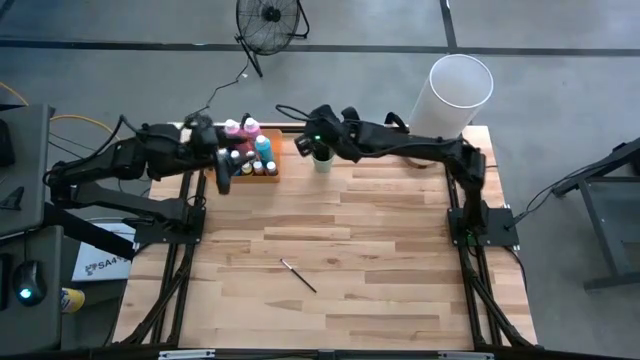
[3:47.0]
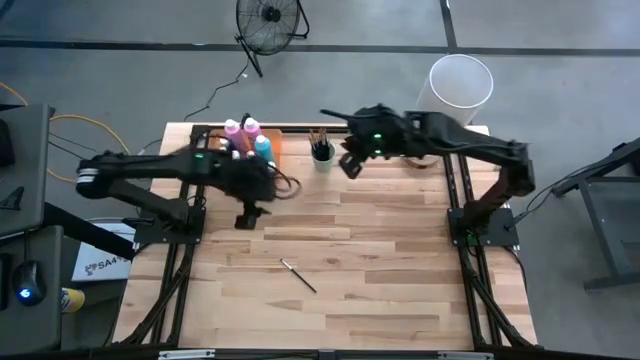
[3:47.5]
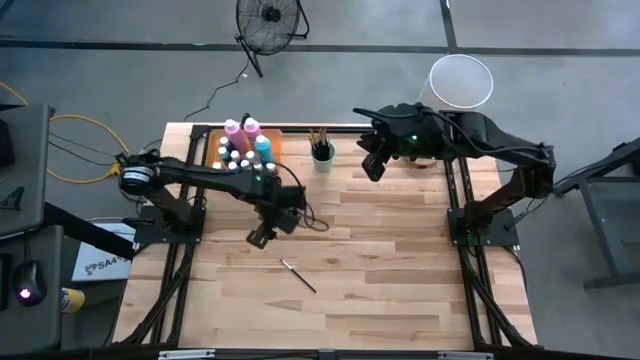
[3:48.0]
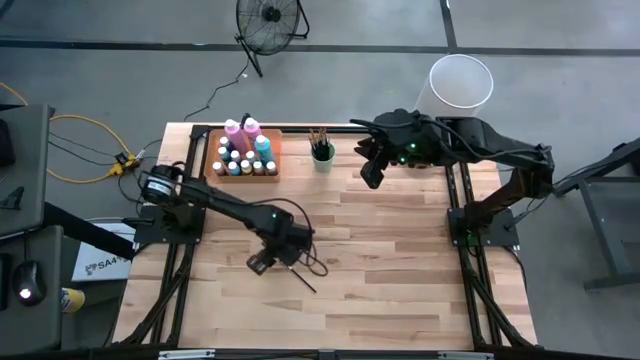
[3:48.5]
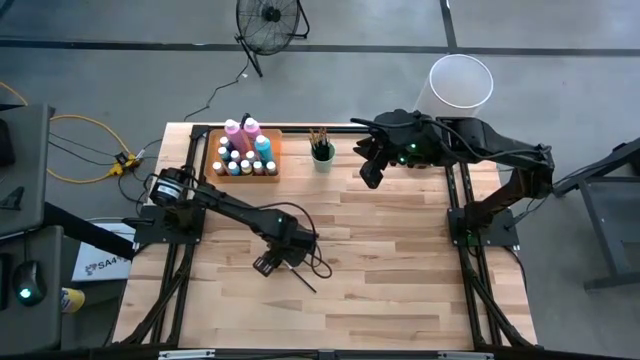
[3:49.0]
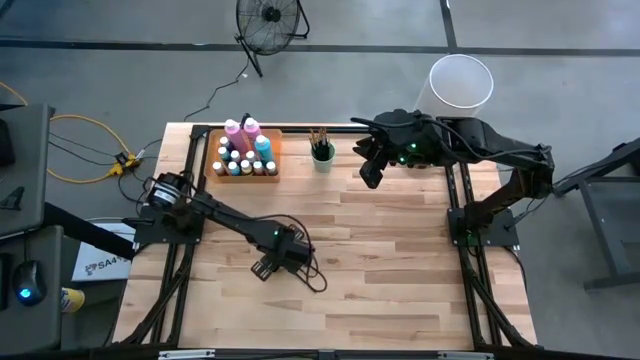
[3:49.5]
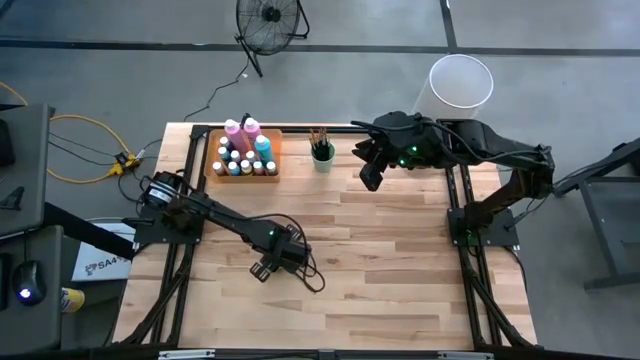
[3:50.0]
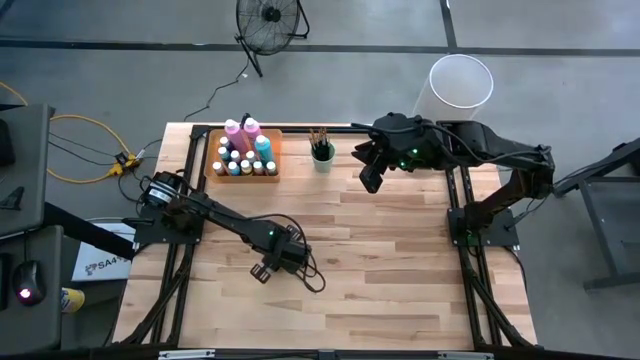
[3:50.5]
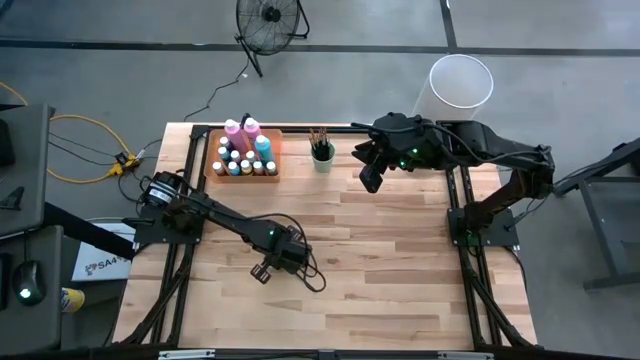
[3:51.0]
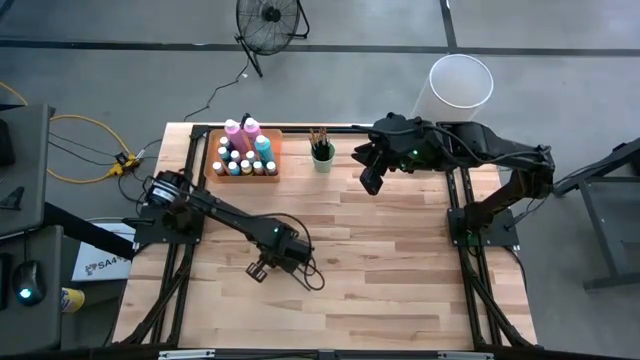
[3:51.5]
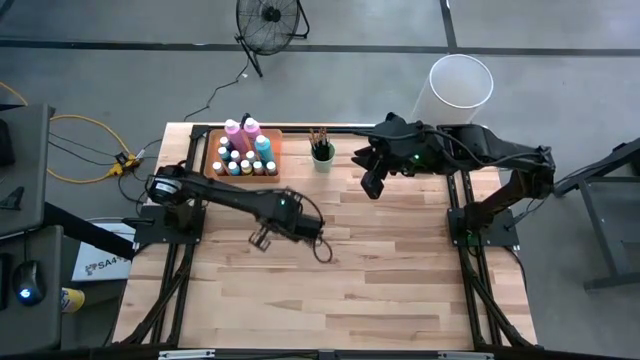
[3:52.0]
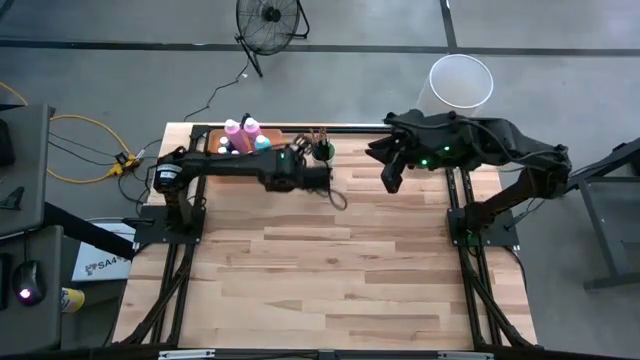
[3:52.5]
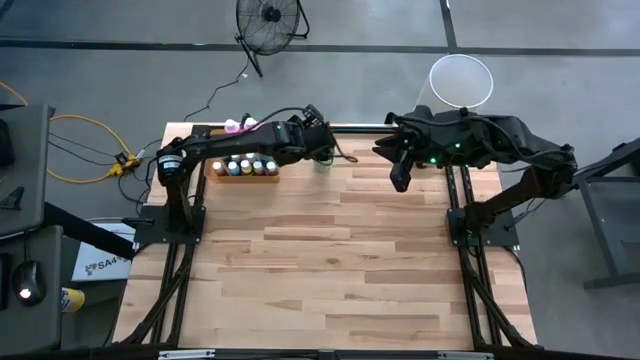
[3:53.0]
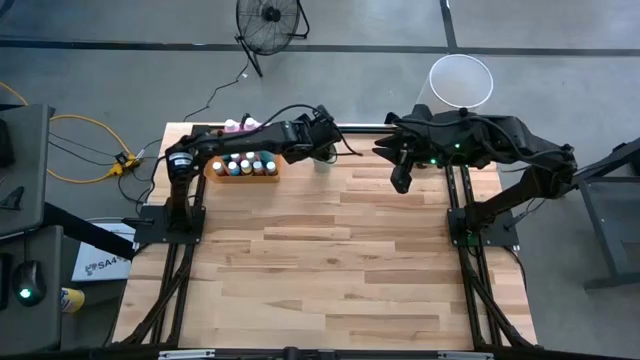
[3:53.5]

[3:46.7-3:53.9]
Task: Pick & Place Paint Supplies
Put the black paint brush into the green cup

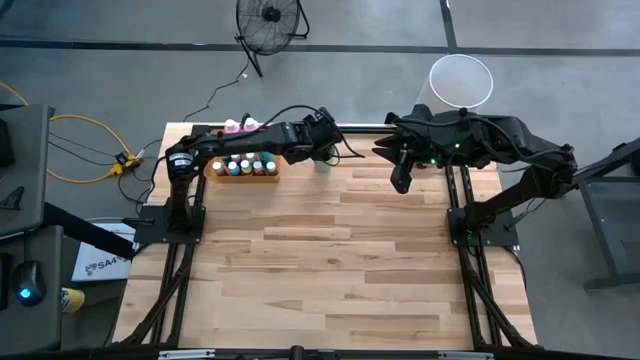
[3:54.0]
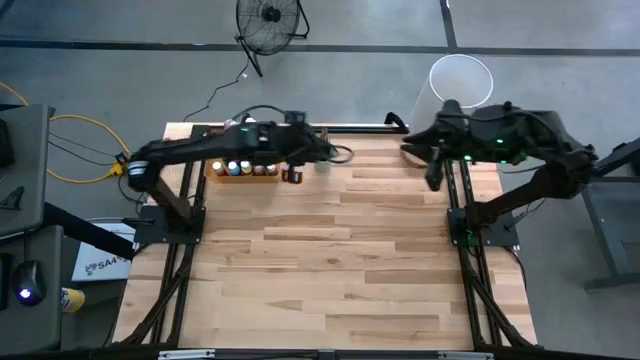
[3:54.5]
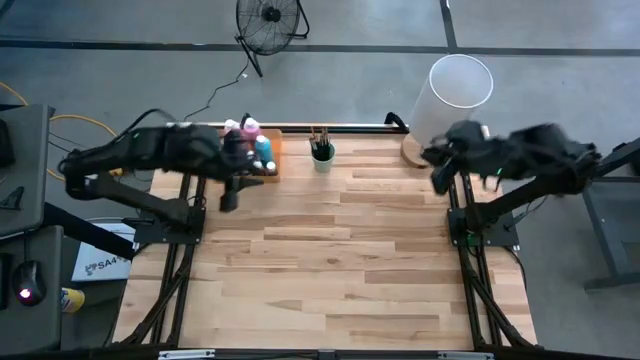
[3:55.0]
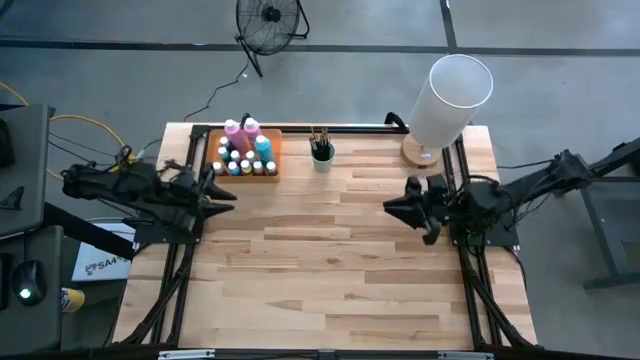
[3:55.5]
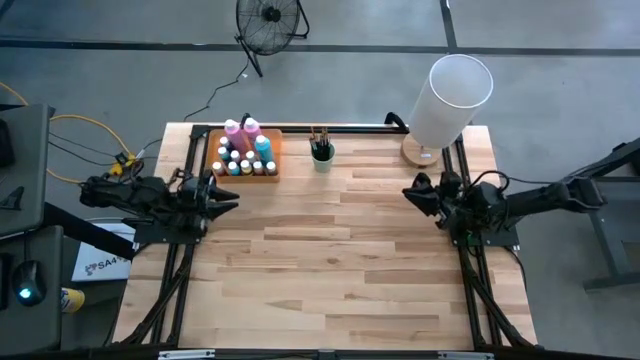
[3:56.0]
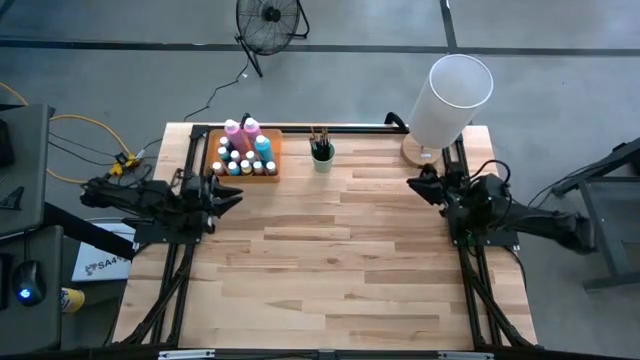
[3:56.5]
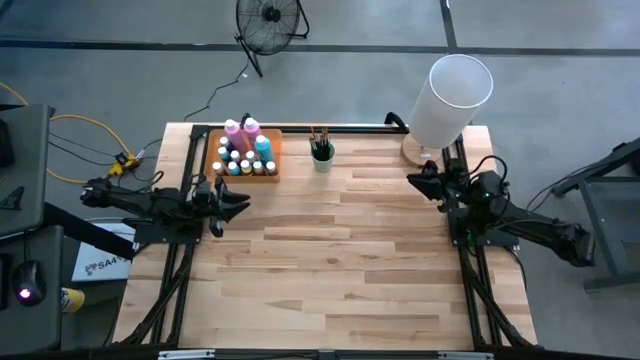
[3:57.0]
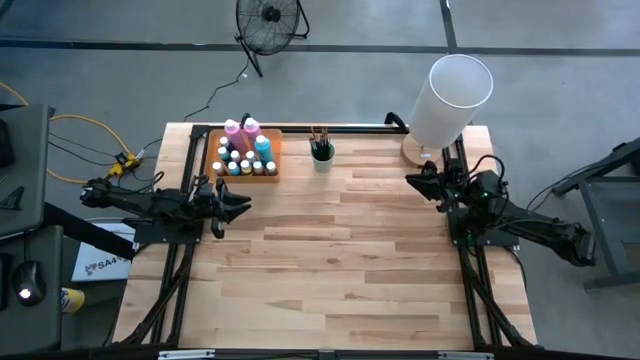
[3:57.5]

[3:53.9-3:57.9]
Return to Home Position

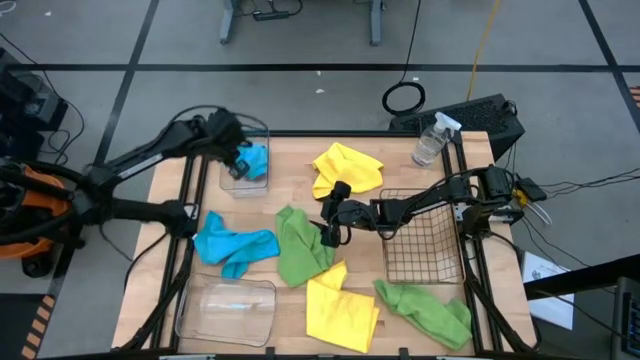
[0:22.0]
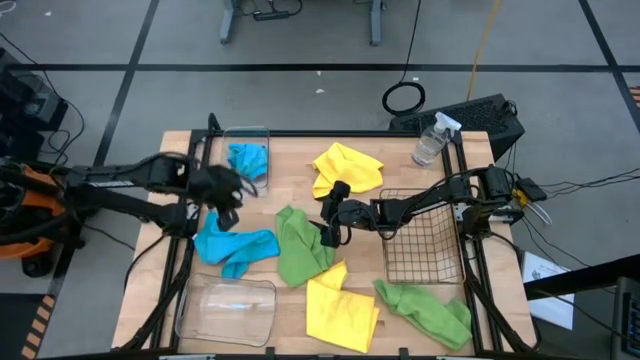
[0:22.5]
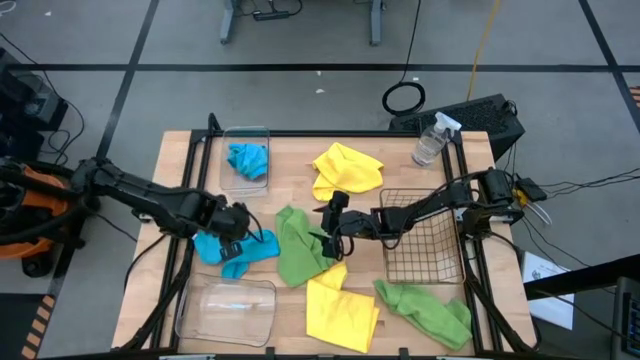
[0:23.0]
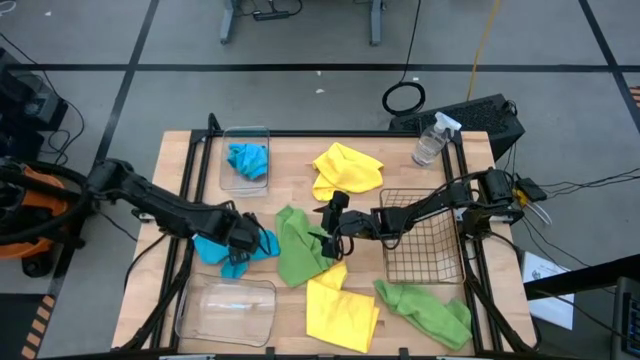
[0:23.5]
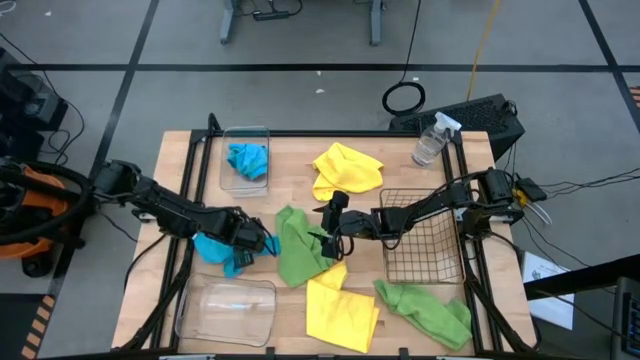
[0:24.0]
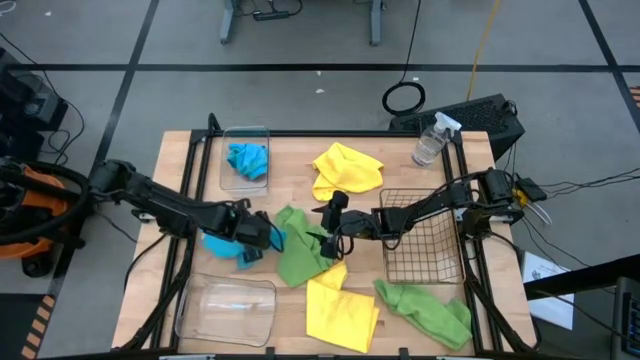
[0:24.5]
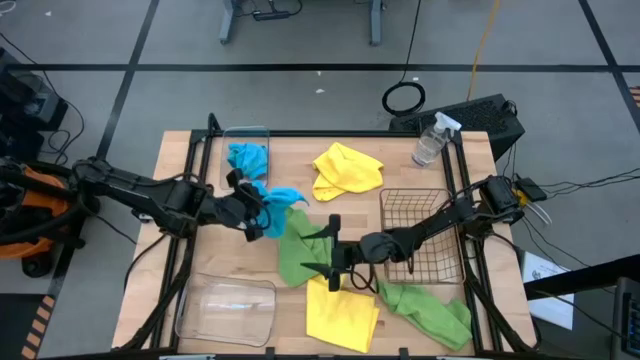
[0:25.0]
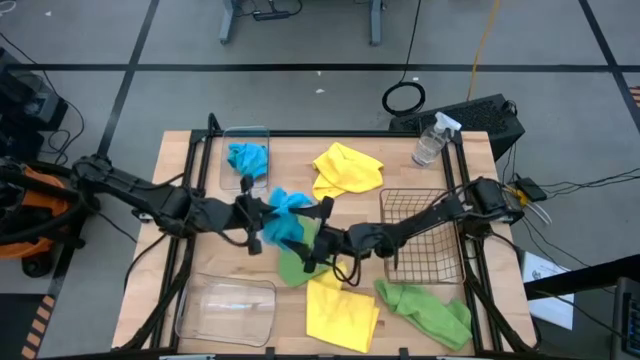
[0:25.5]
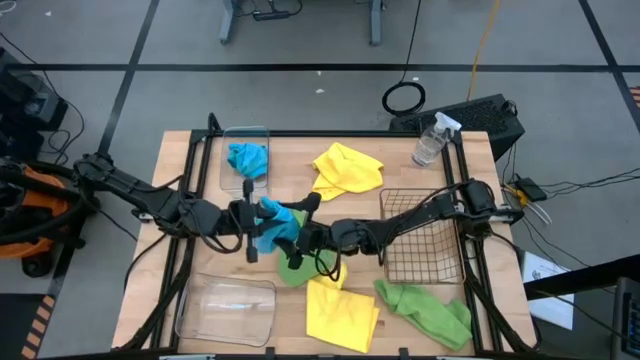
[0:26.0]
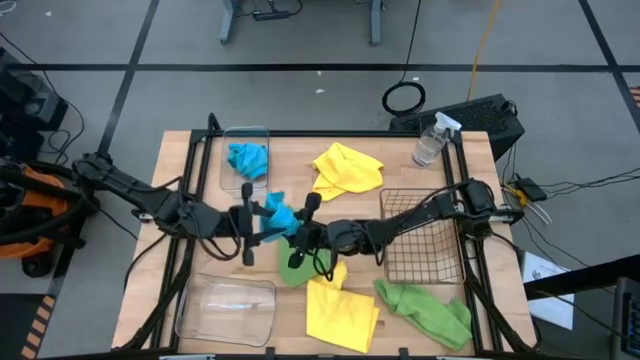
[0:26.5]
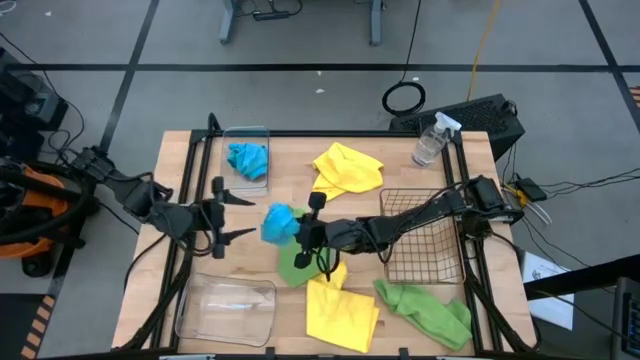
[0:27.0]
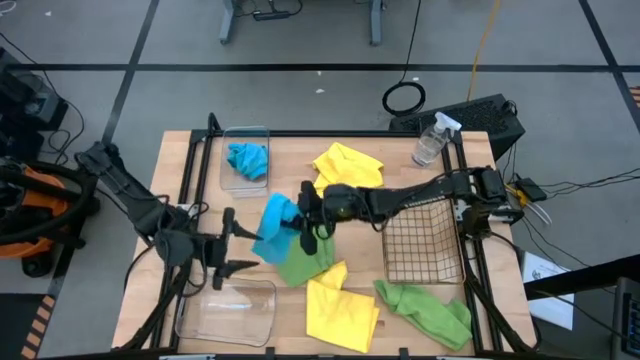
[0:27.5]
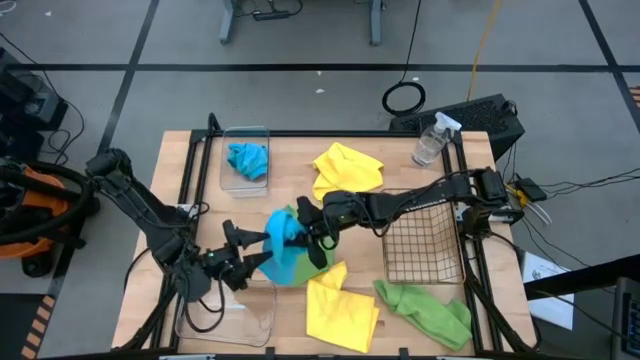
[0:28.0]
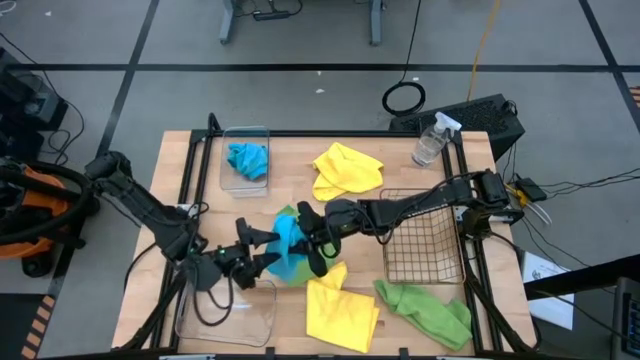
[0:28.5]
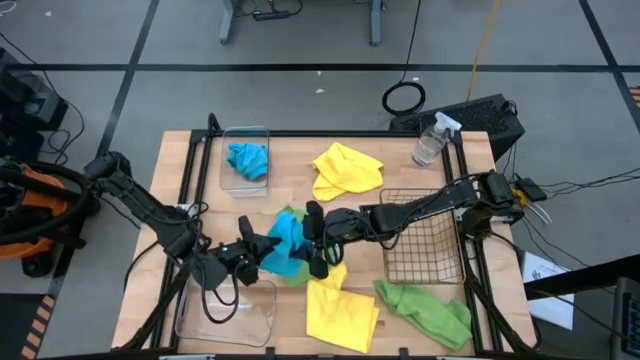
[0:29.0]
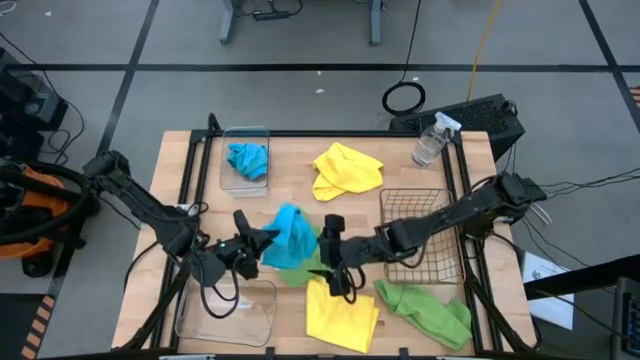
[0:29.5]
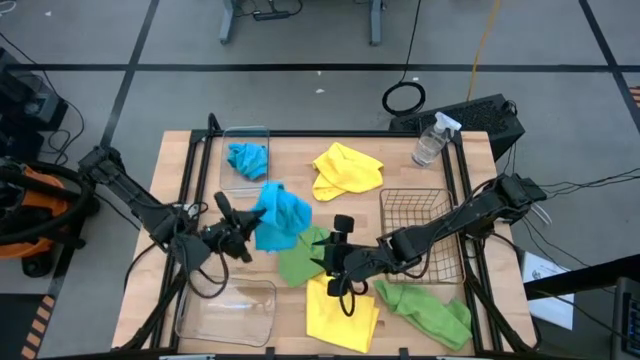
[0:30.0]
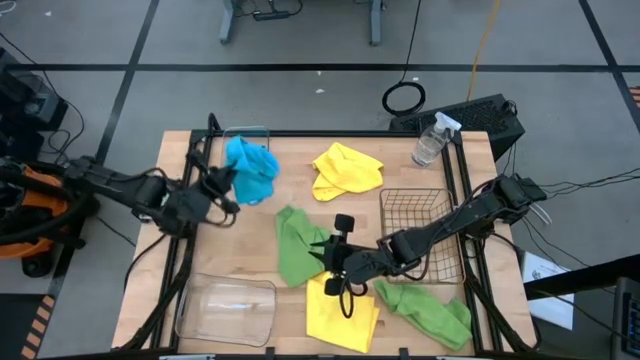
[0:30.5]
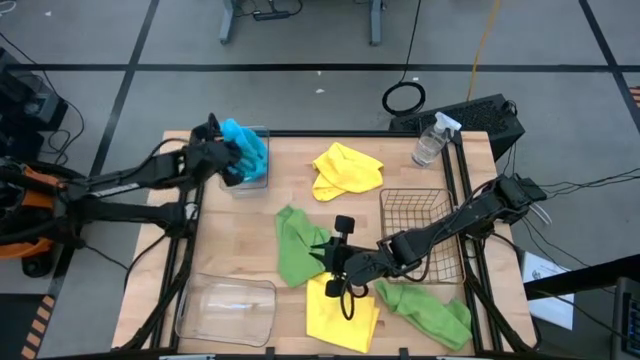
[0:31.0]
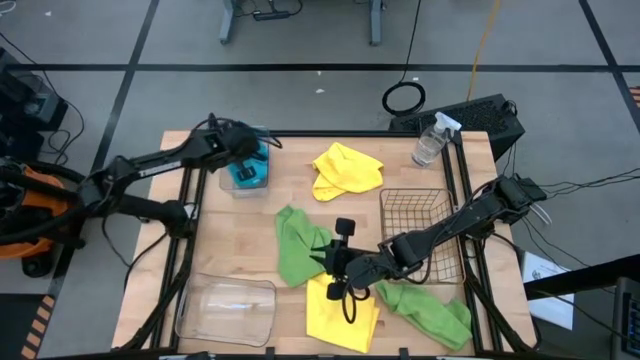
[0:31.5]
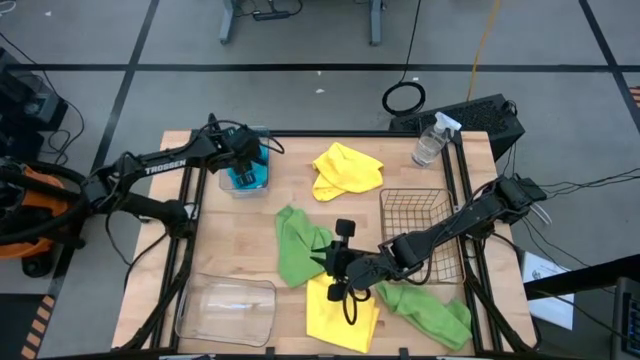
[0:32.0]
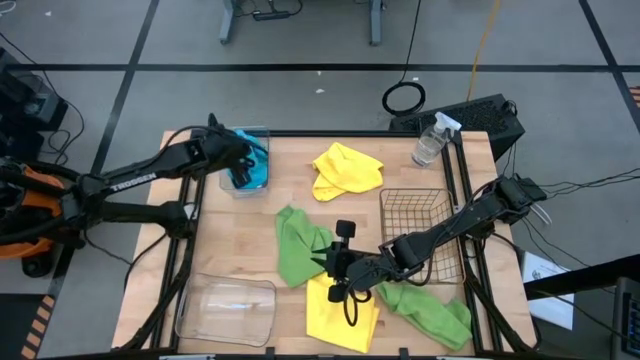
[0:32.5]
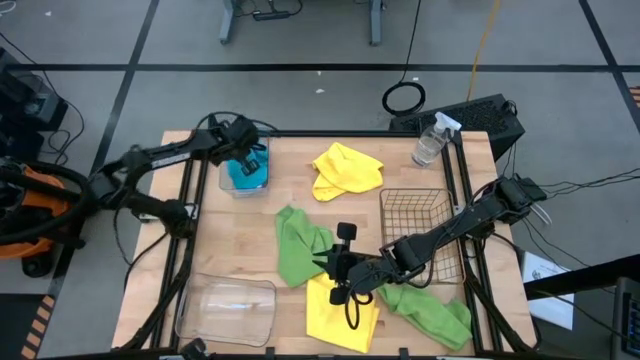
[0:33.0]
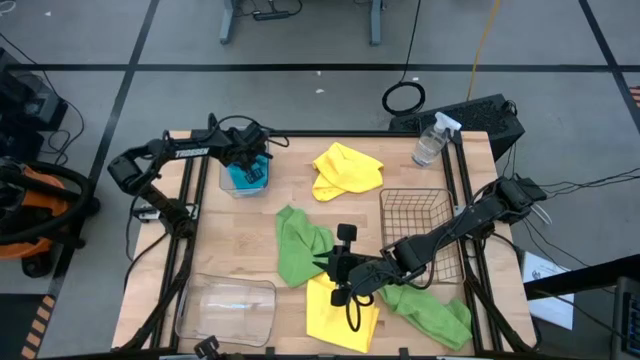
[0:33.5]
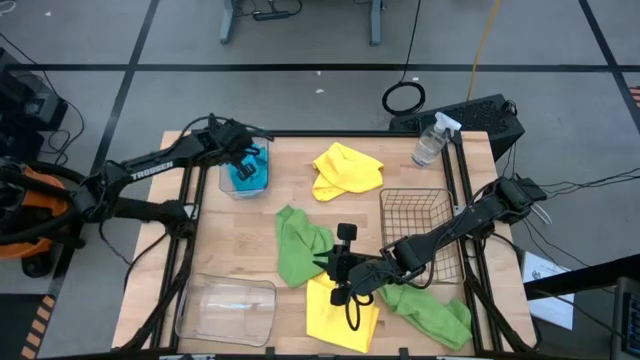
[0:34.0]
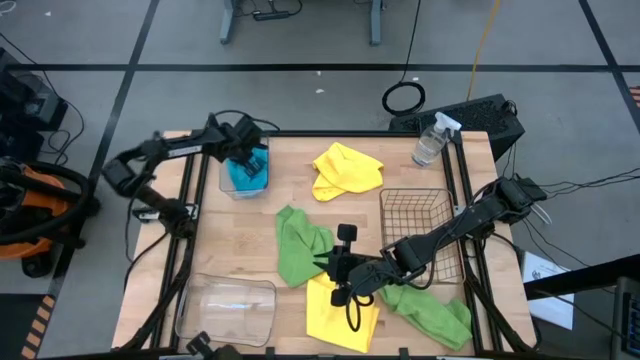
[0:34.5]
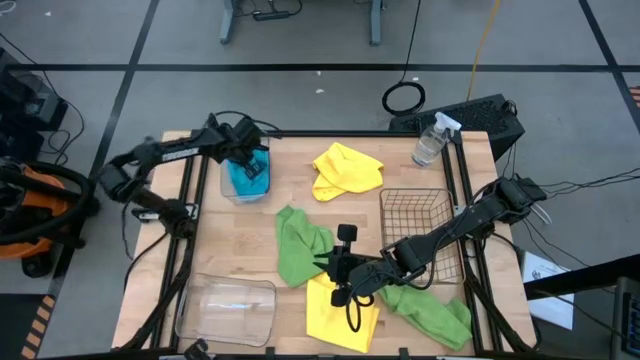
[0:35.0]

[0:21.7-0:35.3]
Task: Sort microfiber towel by color & place in baskets
Put the blue microfiber cloth into the top transparent bin
